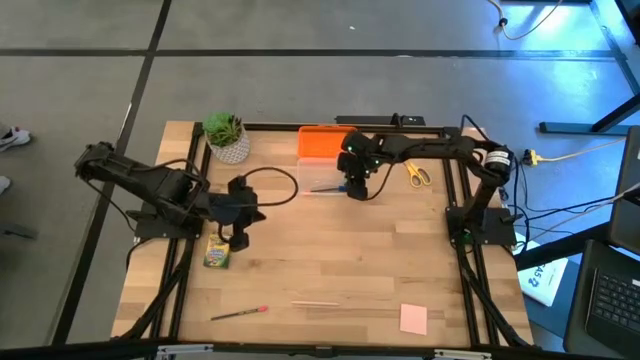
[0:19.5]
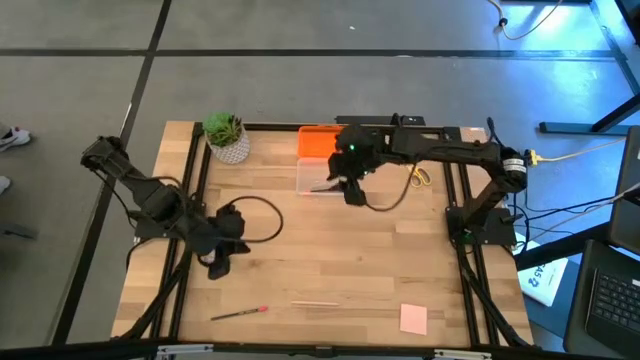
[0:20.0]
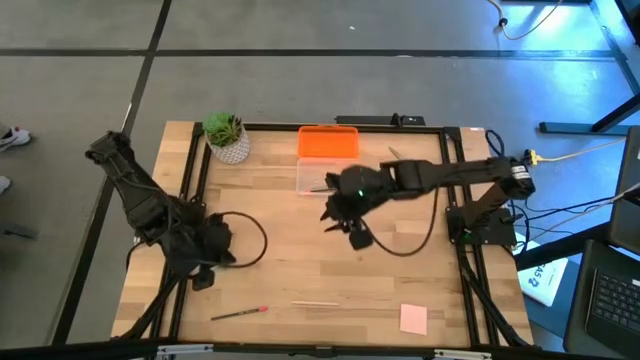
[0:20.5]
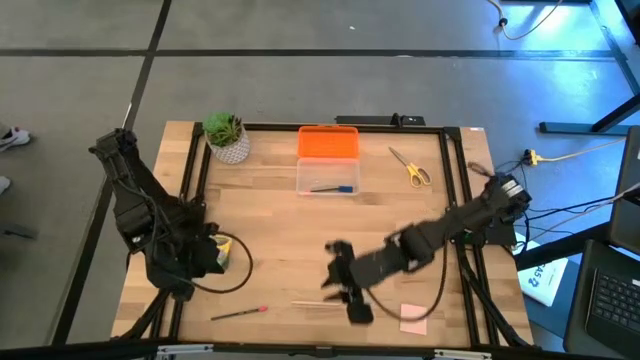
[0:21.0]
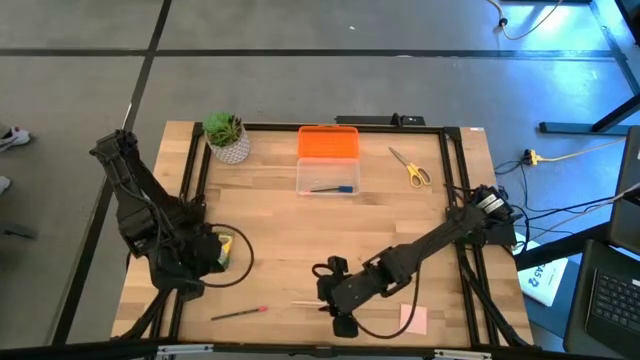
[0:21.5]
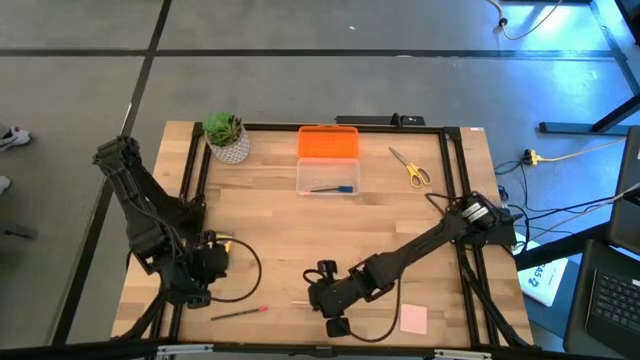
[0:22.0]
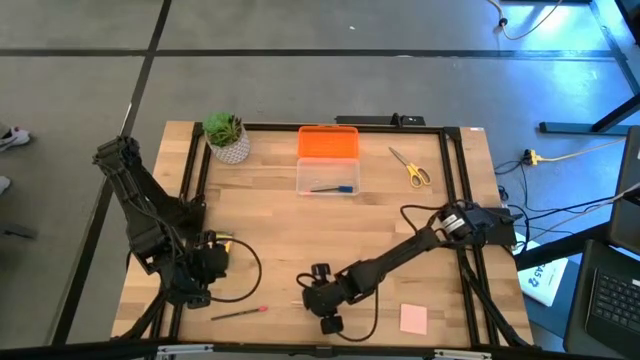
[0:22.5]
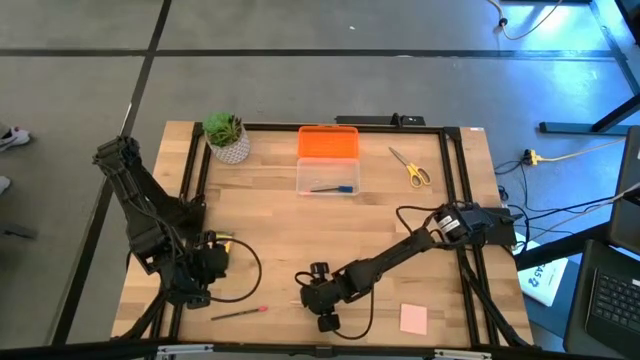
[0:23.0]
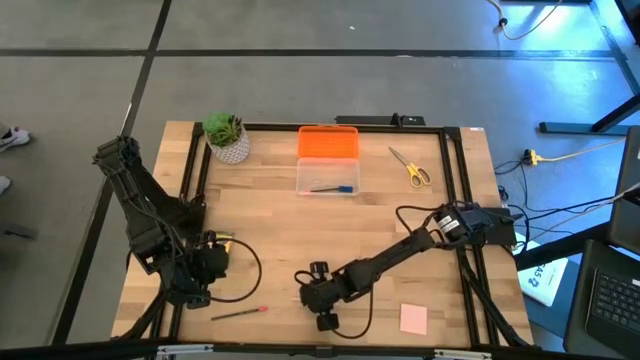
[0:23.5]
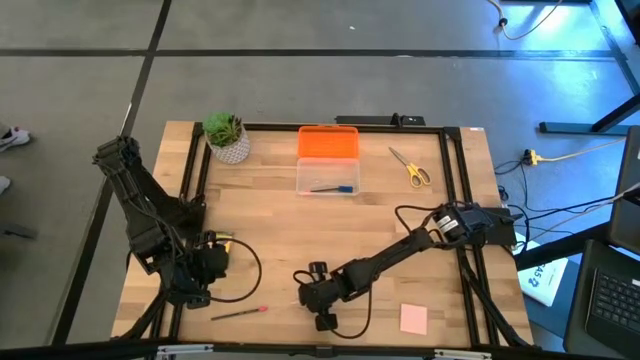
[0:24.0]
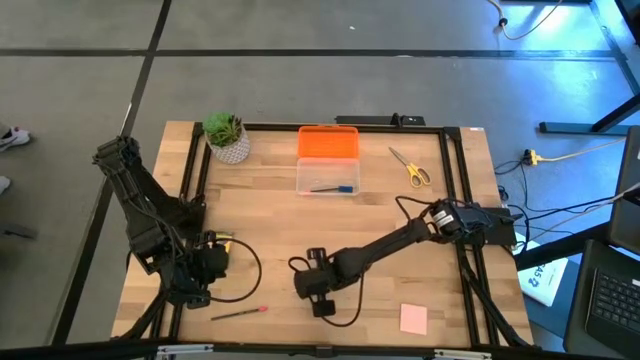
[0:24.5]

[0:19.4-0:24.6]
Task: Pack school essentials
Put the pink pen into the orange supply box

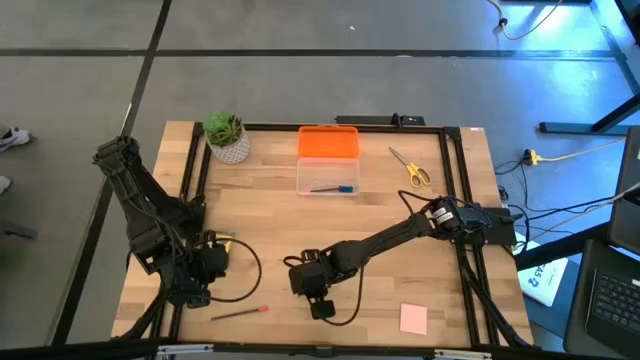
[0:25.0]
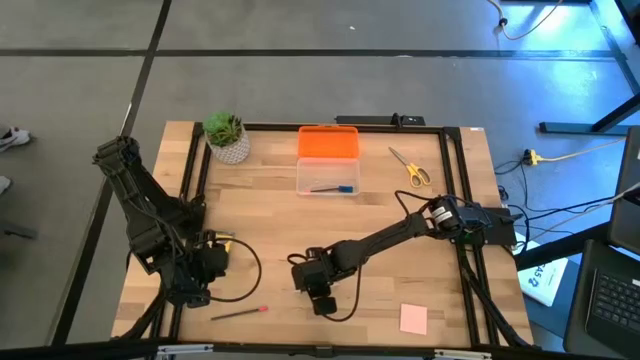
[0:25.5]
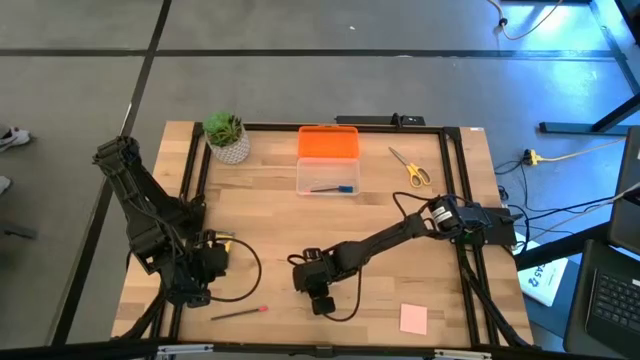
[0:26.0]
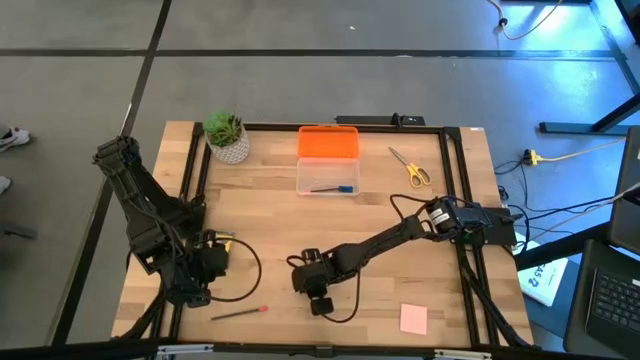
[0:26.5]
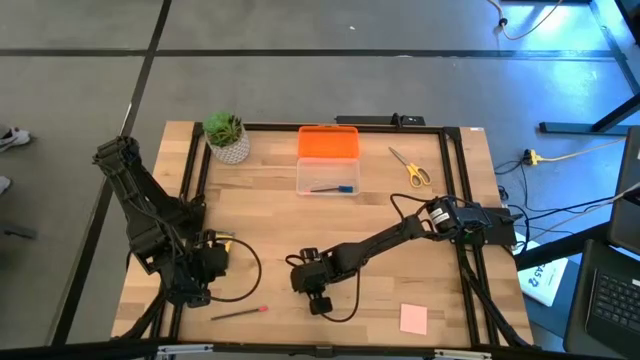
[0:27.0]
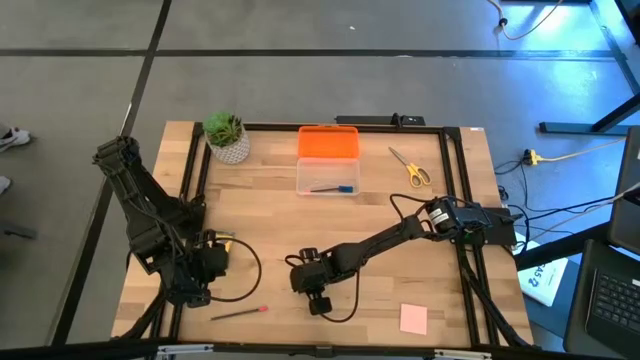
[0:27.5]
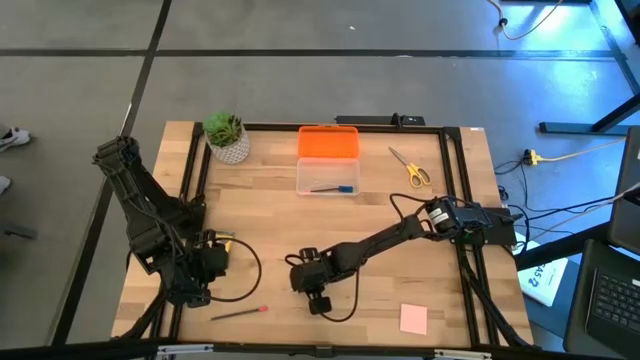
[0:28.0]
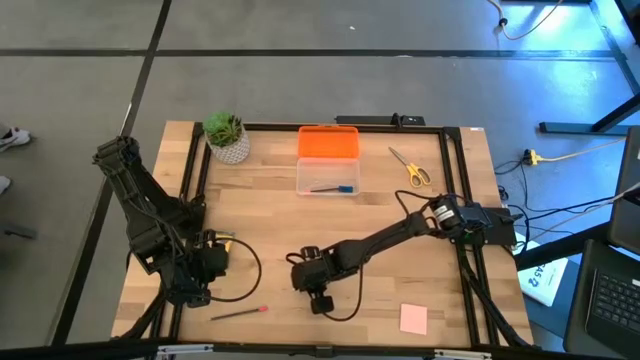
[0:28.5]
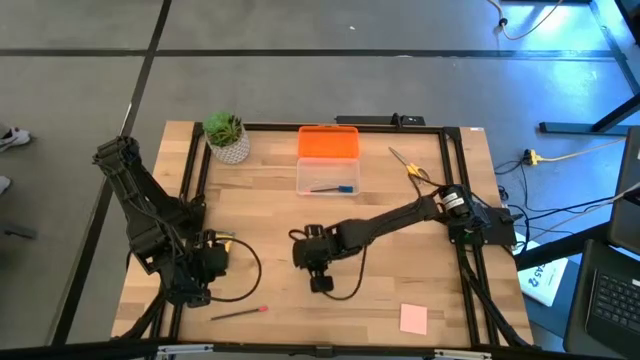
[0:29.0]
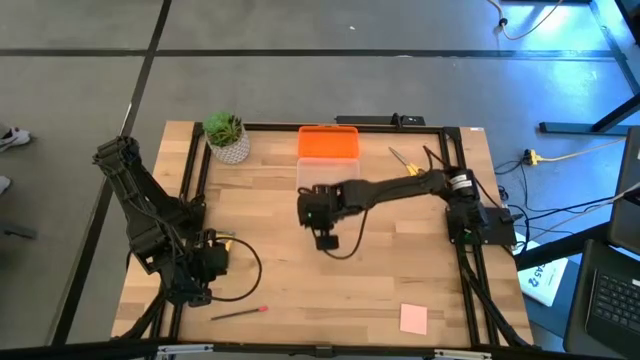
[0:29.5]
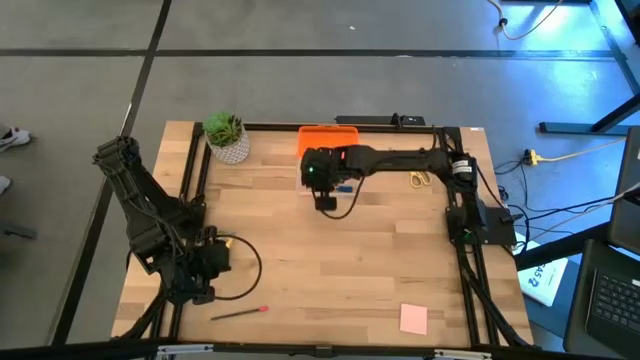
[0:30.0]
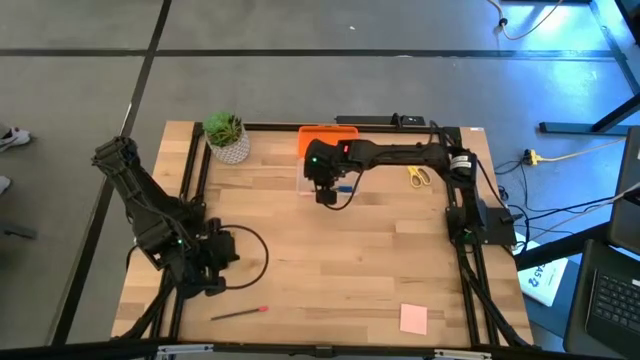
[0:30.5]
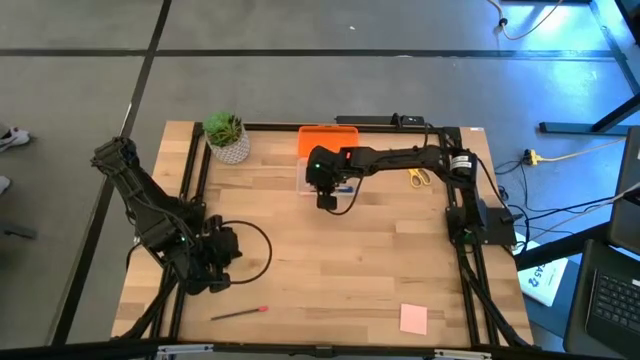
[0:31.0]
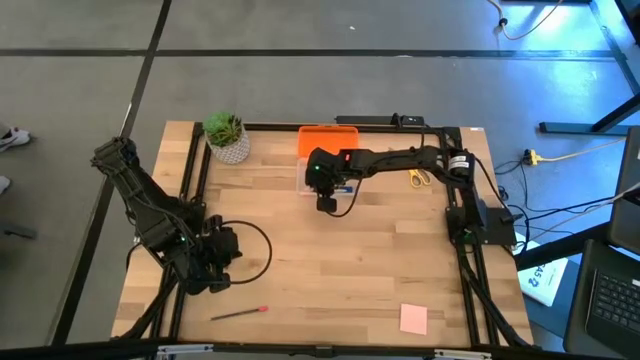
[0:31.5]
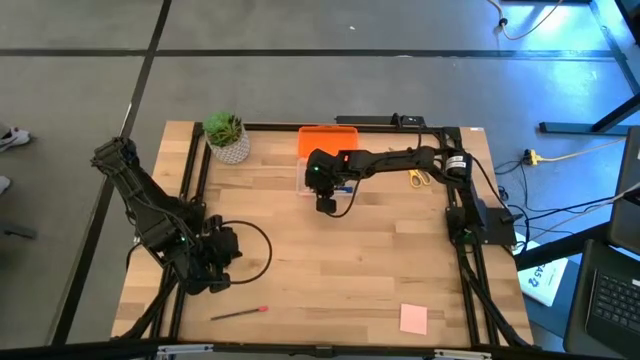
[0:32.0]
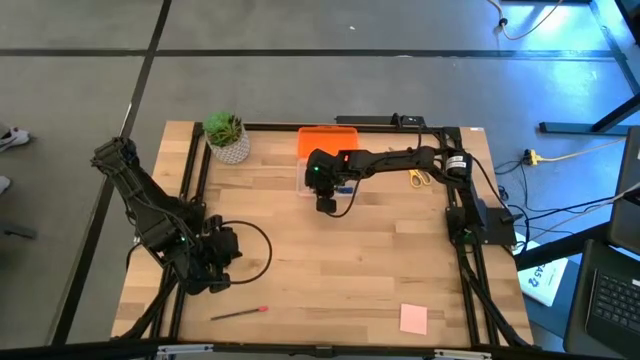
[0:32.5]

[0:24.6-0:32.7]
Put the pink pen into the orange supply box

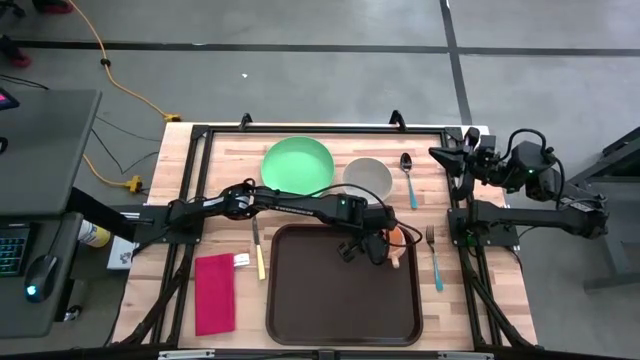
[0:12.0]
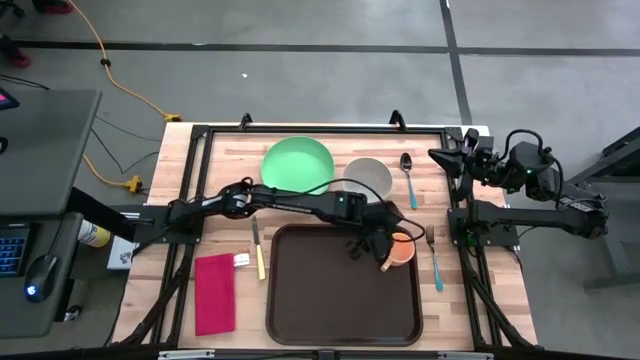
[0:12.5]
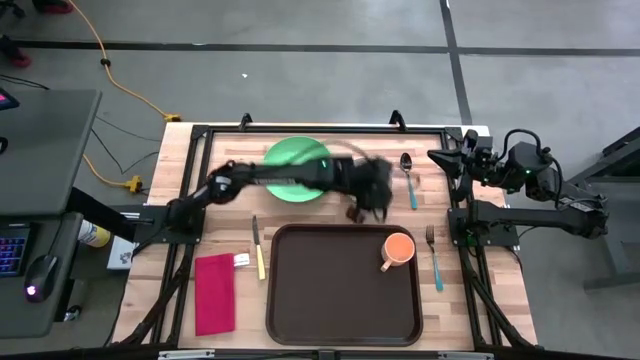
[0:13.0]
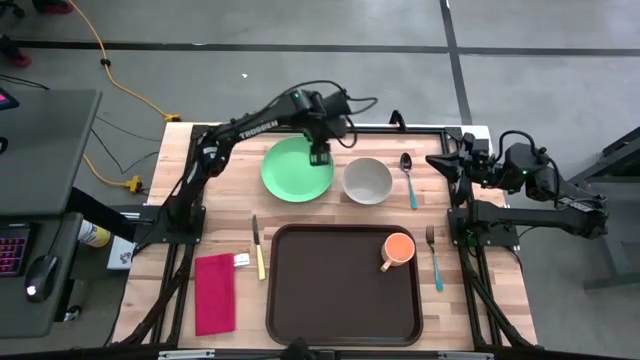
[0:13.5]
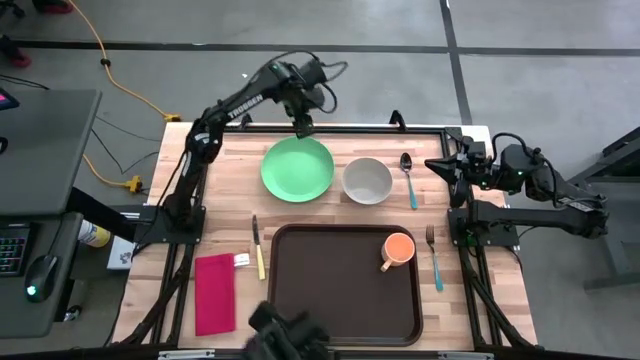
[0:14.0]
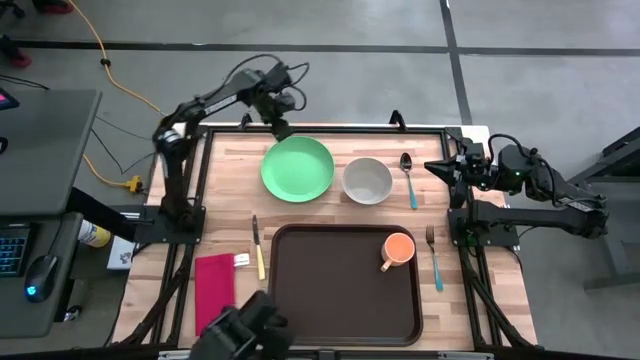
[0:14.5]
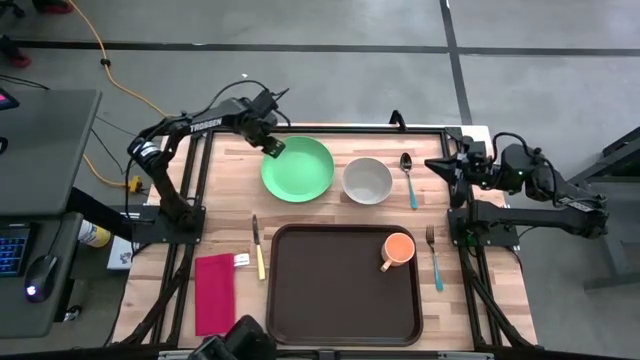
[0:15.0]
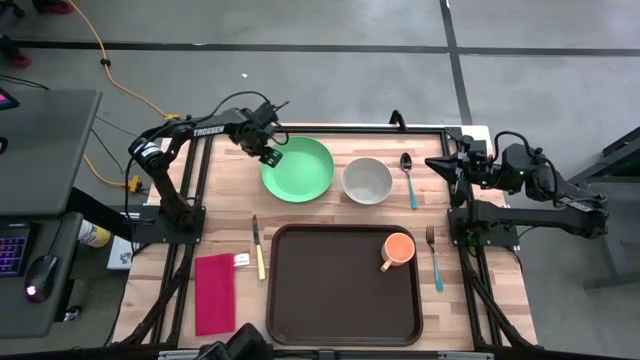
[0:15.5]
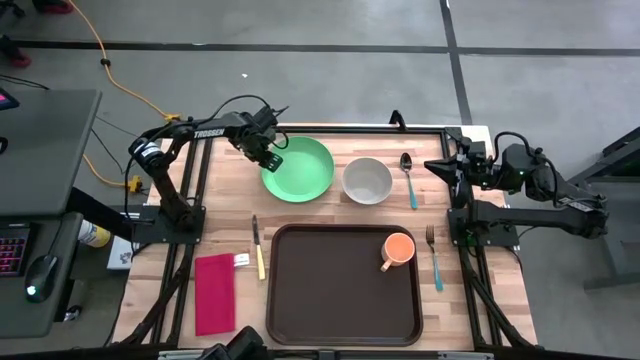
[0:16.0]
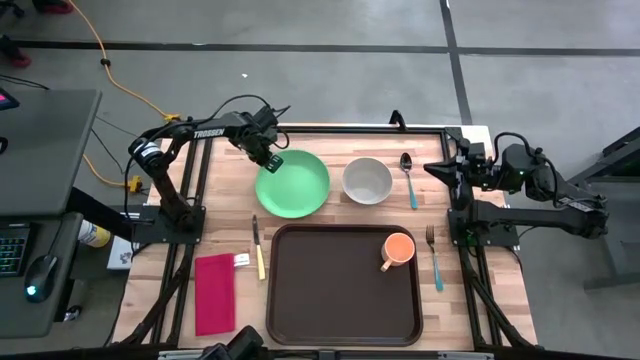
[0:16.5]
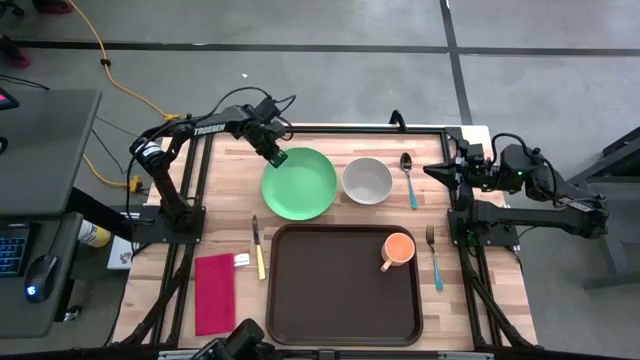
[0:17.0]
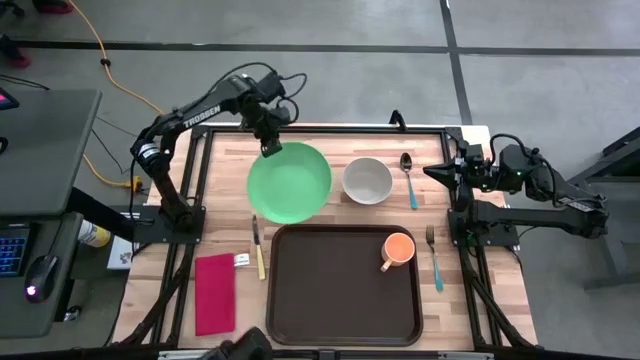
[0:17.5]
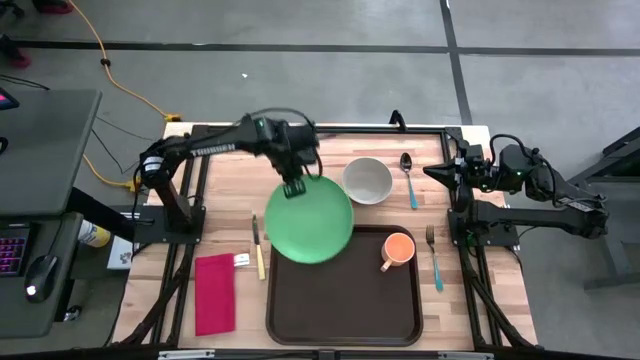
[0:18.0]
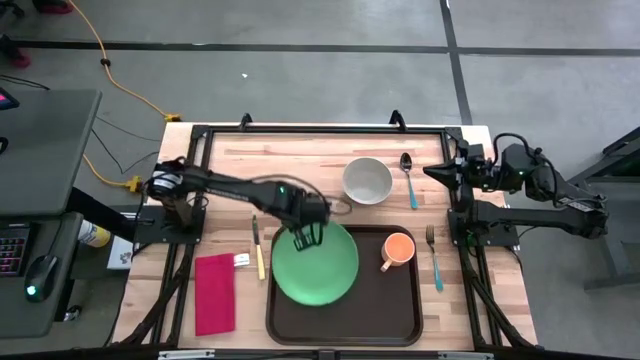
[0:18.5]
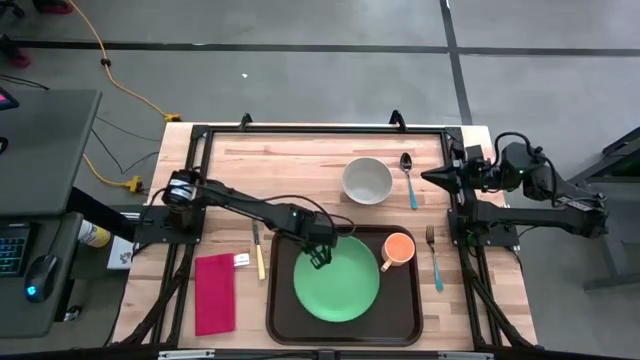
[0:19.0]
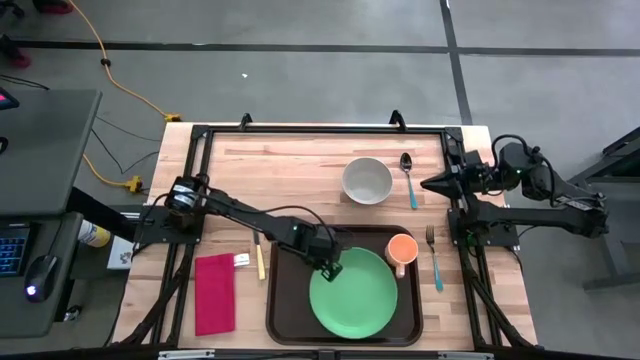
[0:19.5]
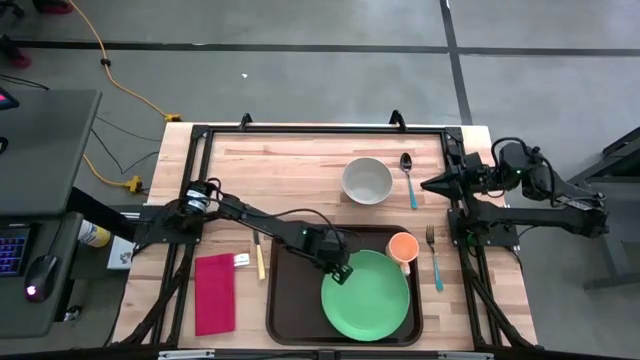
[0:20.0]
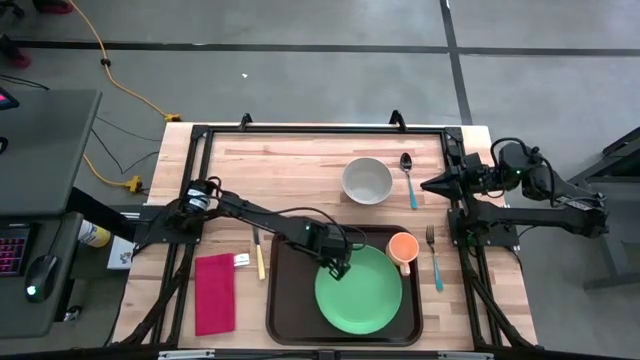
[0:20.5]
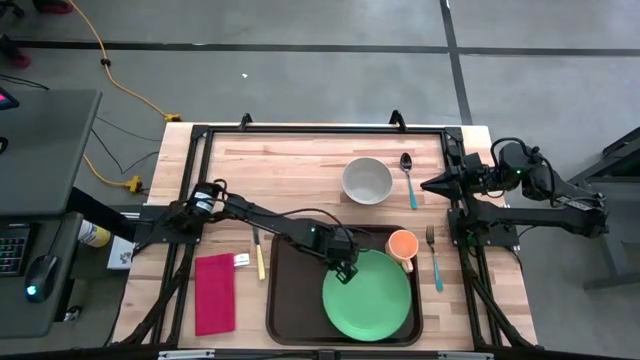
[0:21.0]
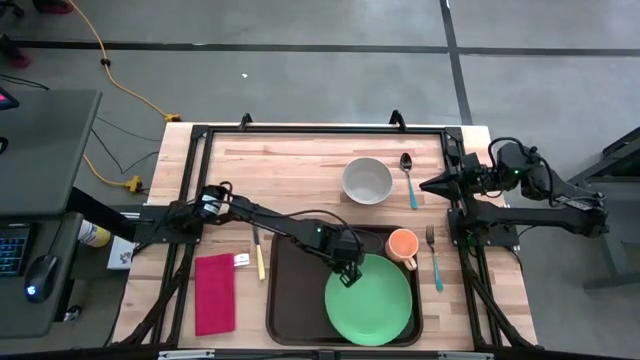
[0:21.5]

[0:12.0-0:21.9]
Task: Set up tray
Put the green plate on the black serving tray to the bottom left of the orange mug
